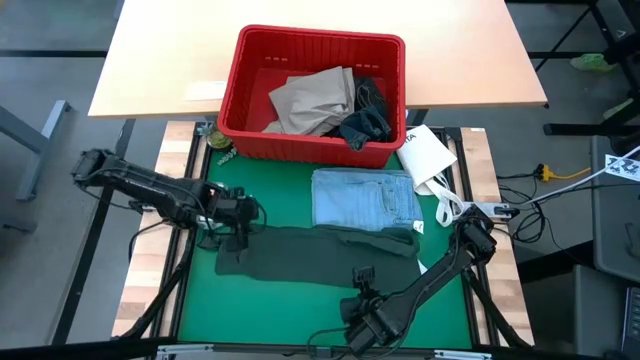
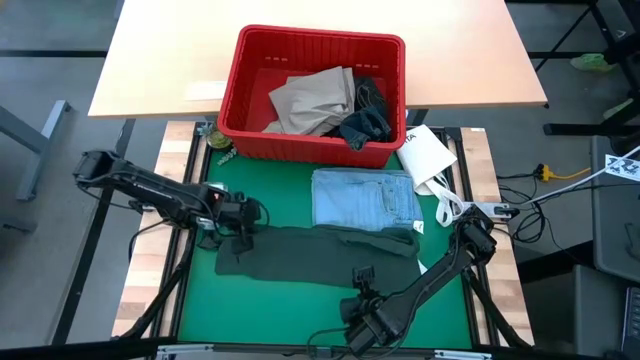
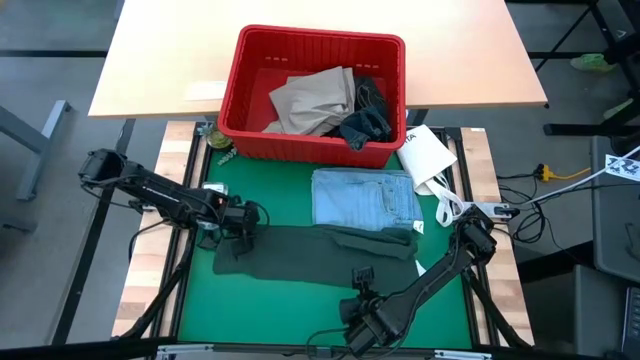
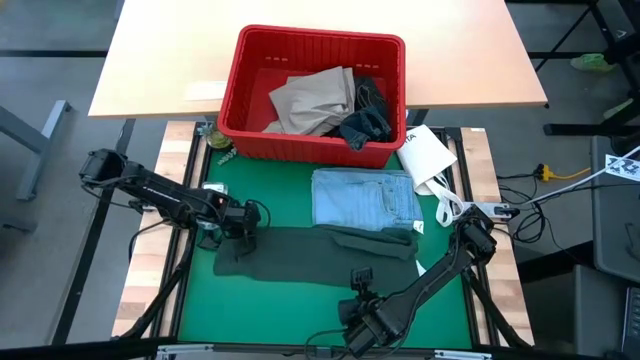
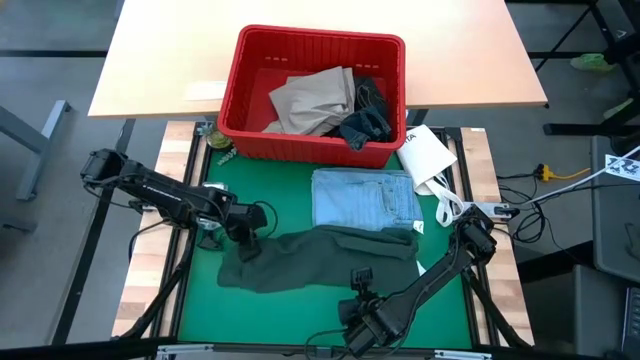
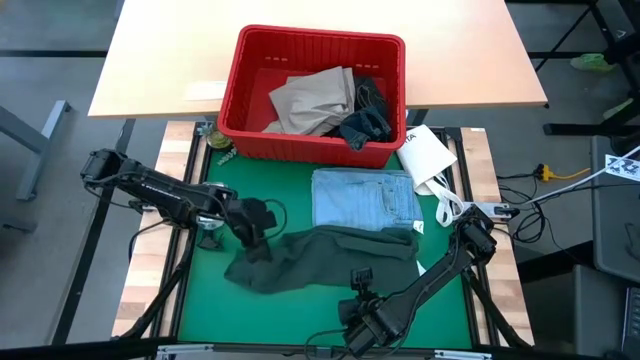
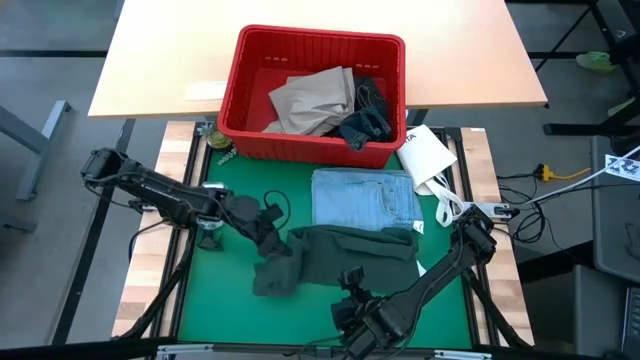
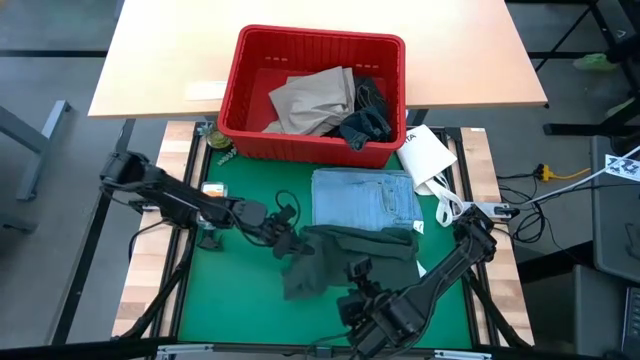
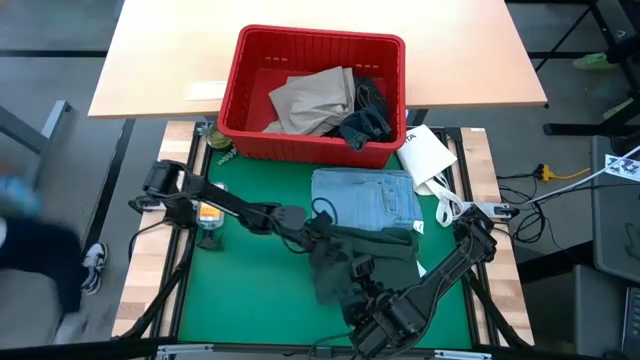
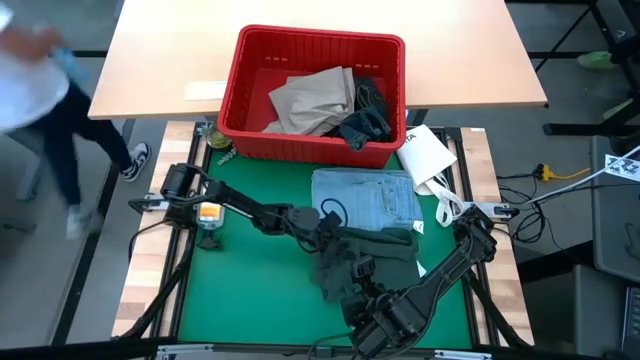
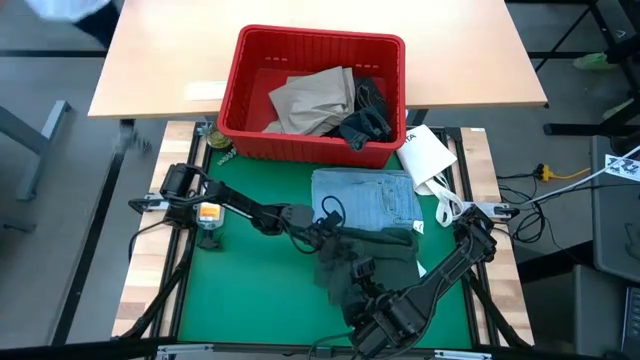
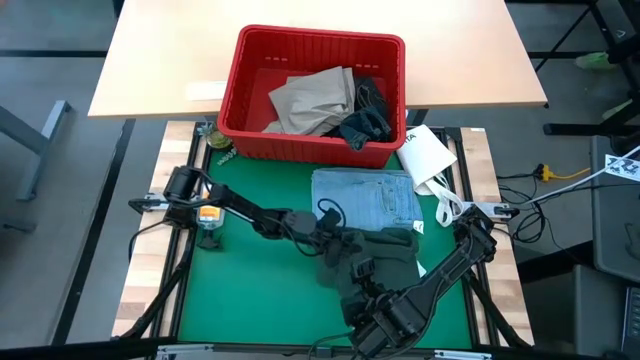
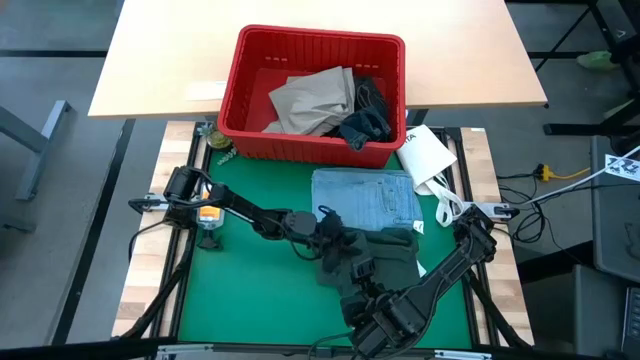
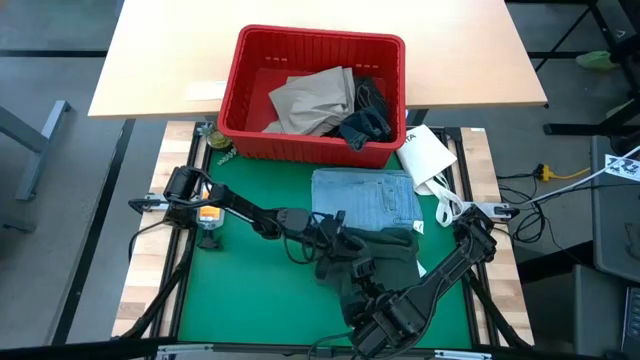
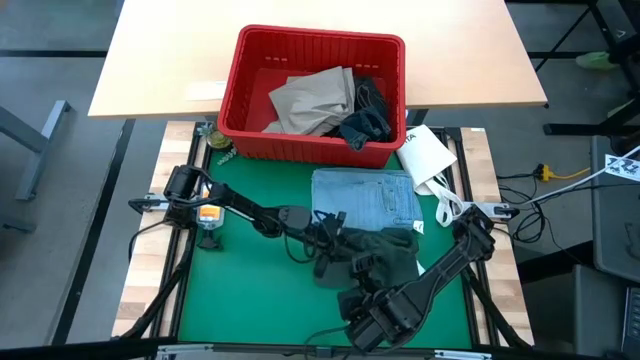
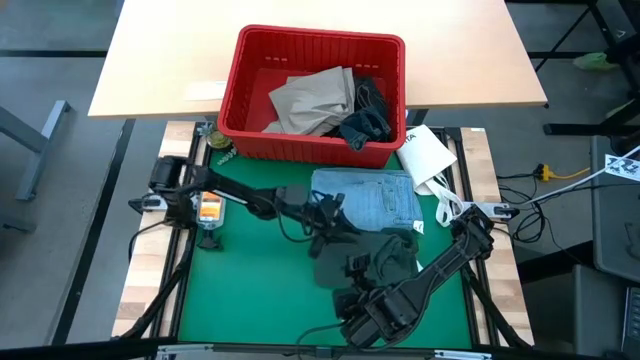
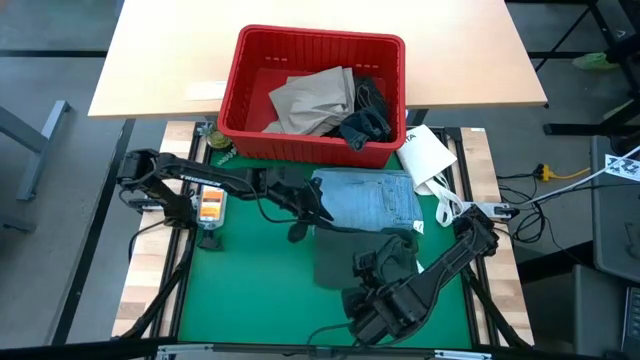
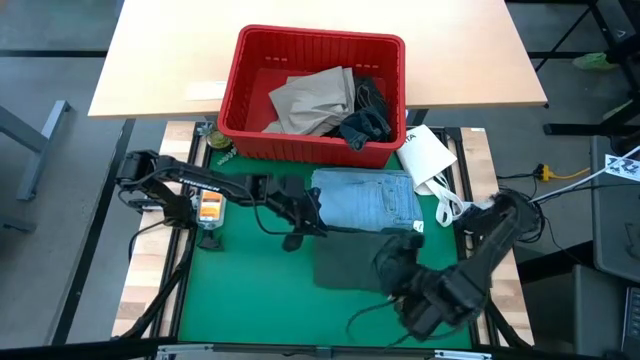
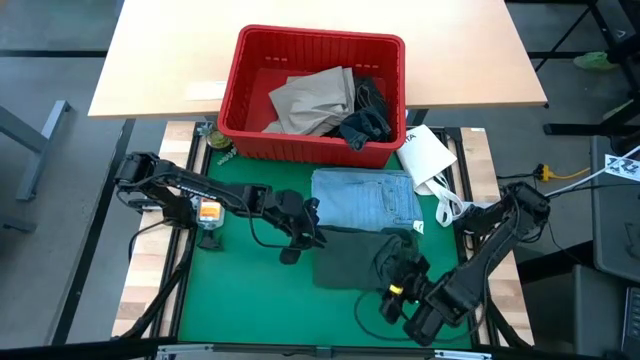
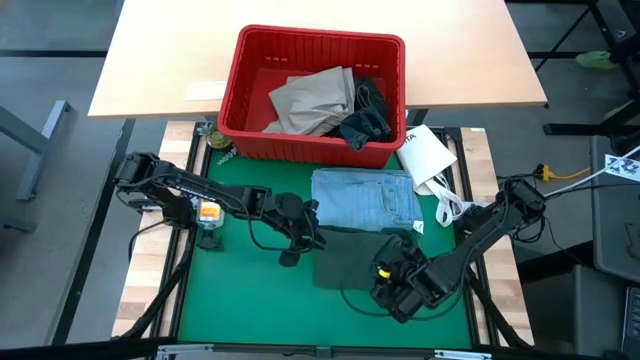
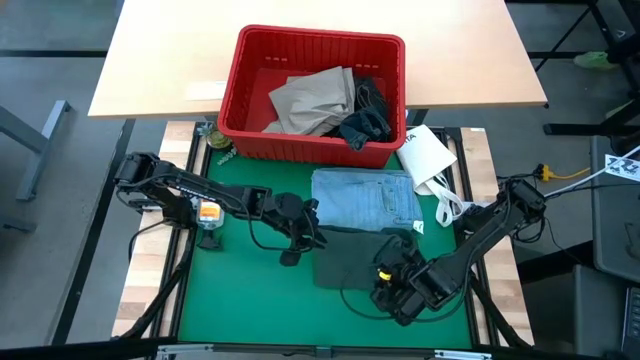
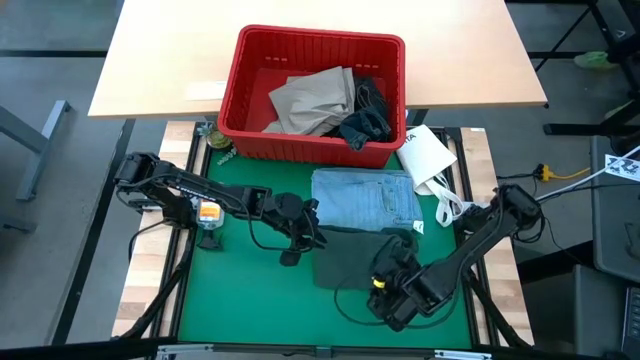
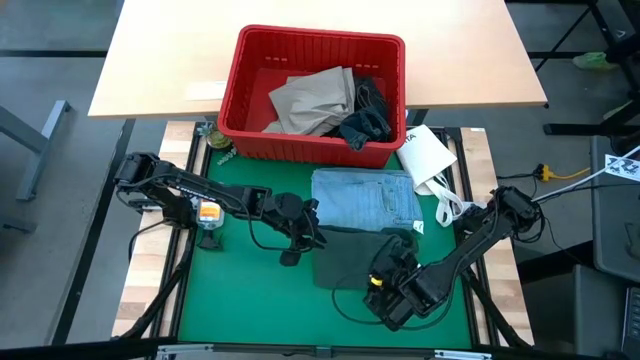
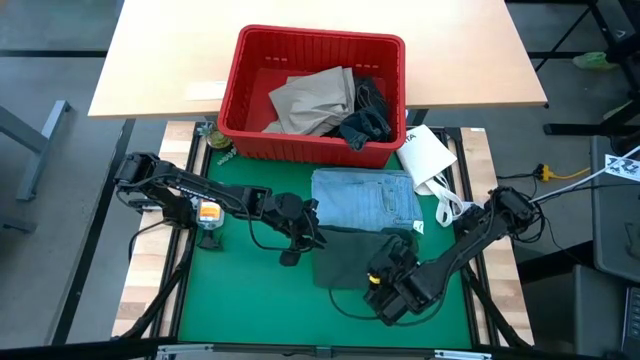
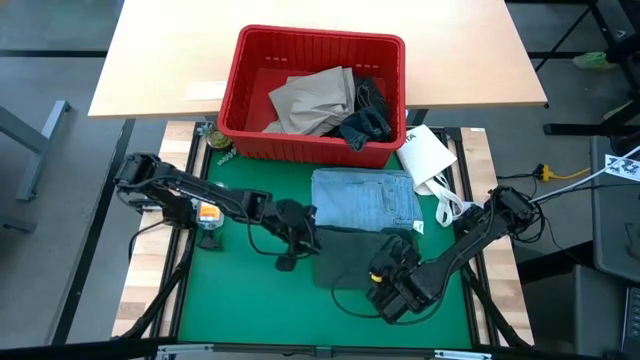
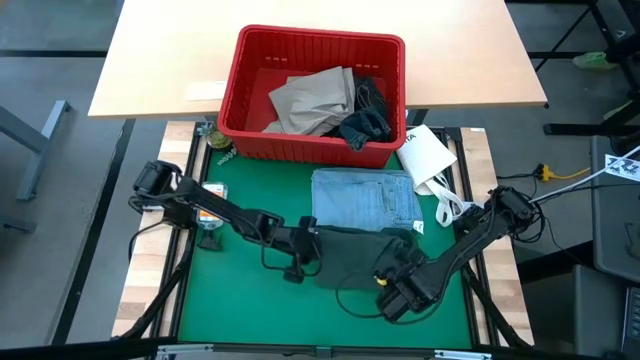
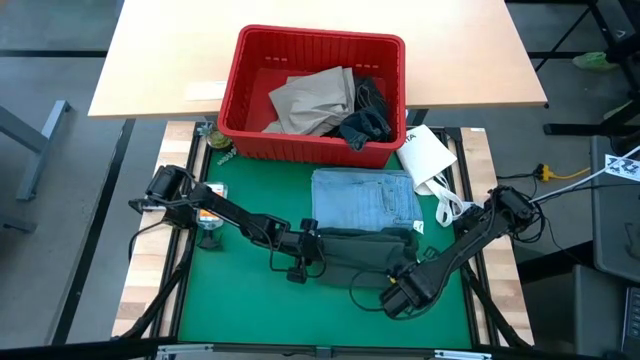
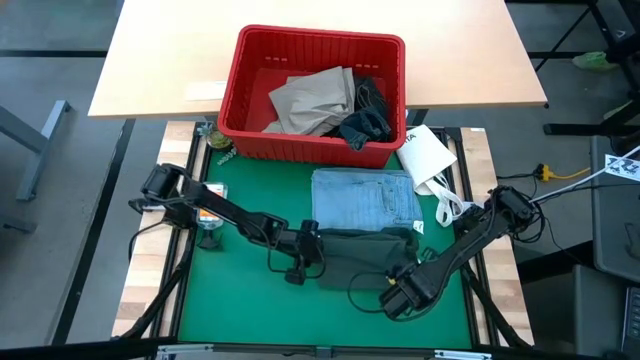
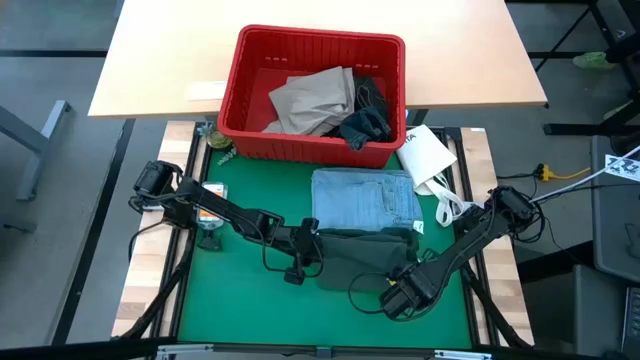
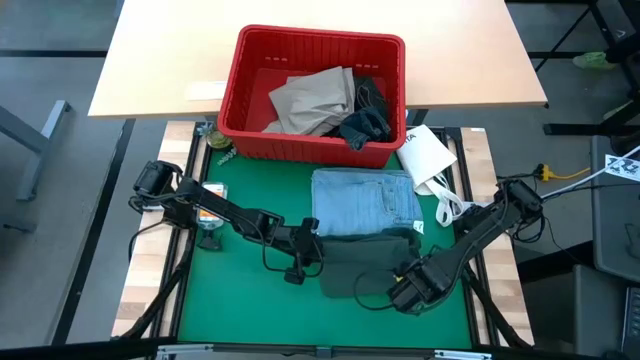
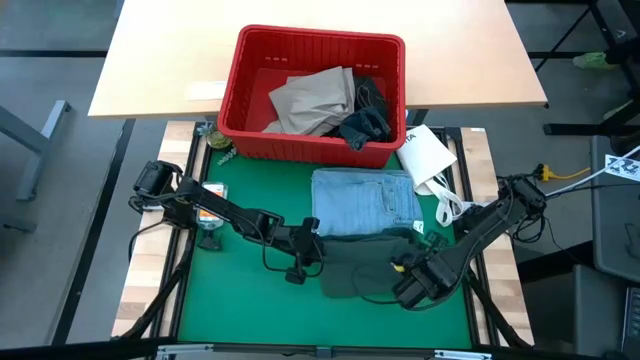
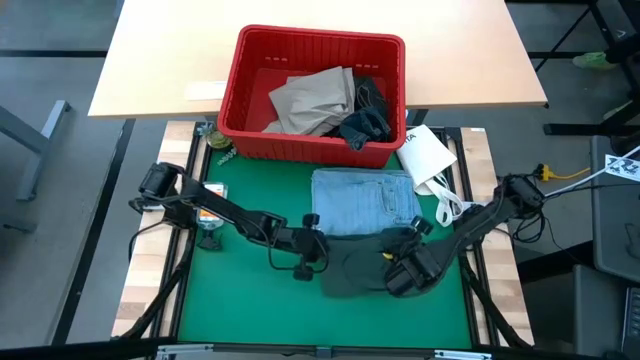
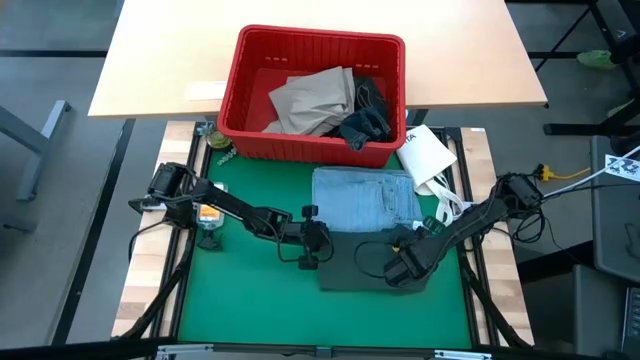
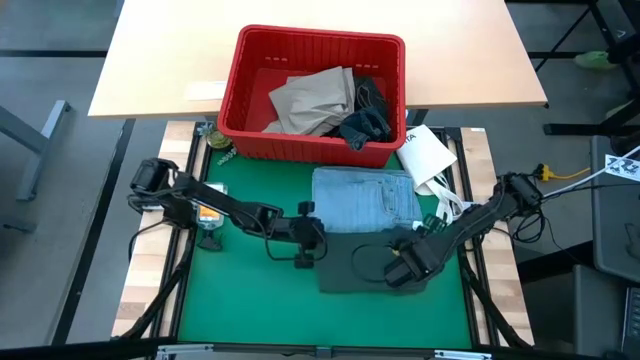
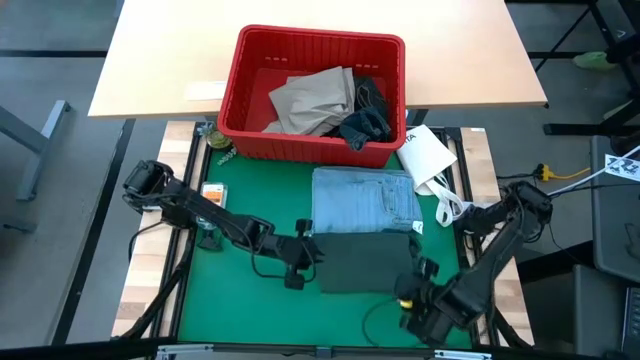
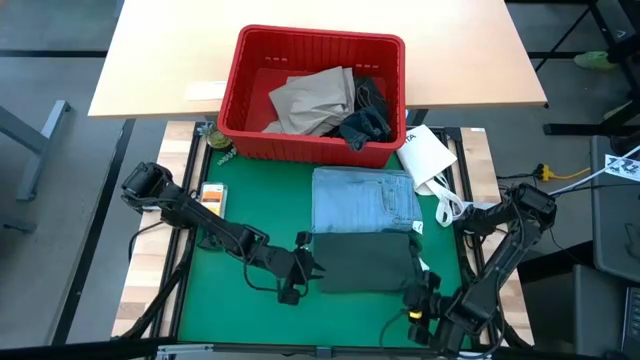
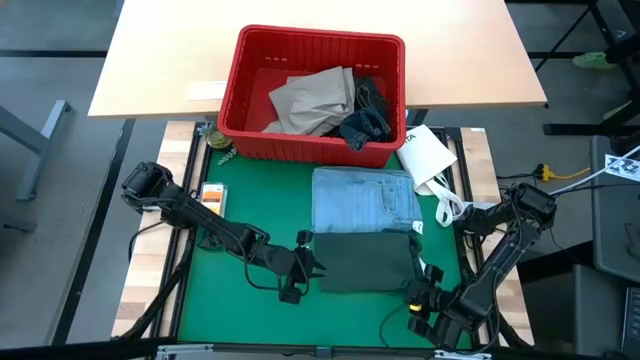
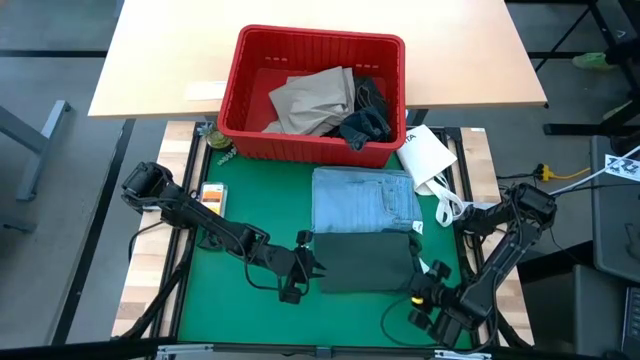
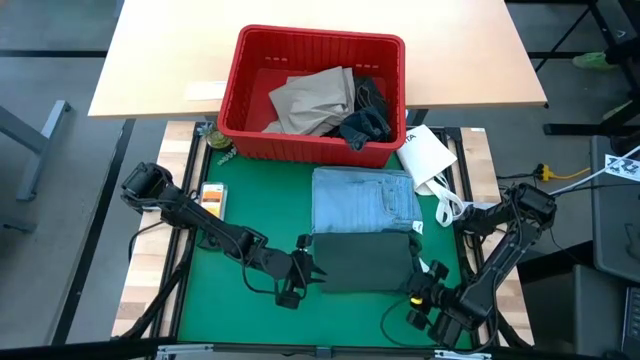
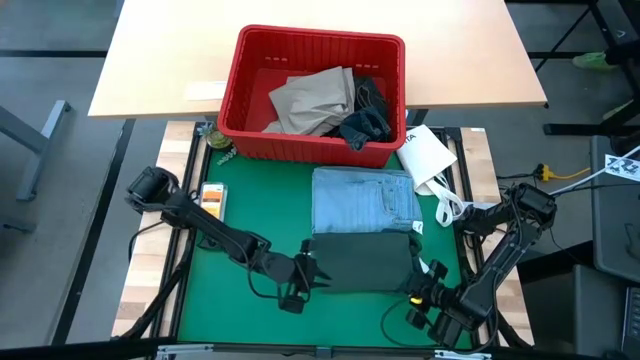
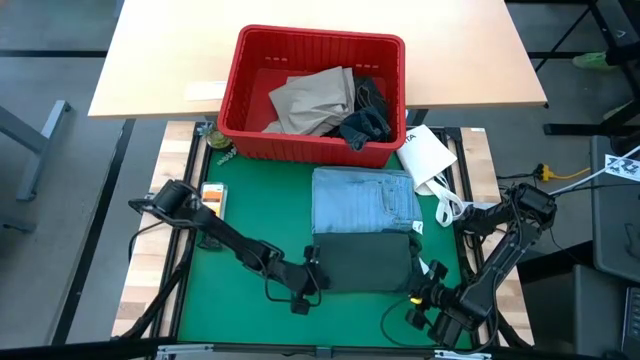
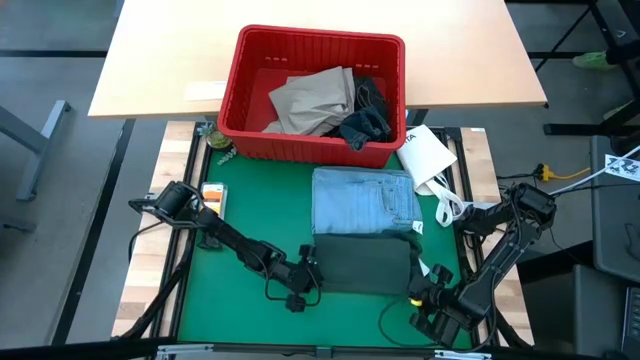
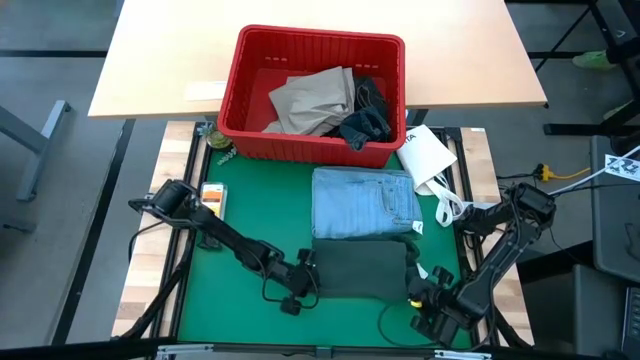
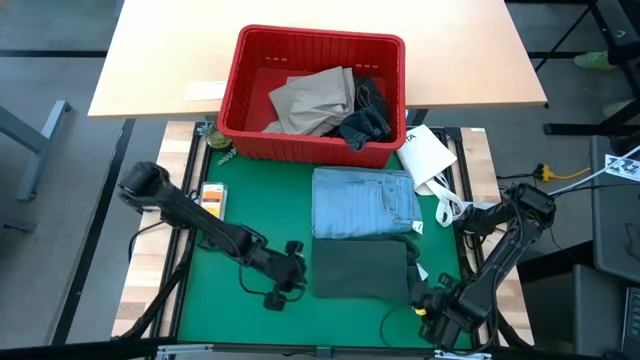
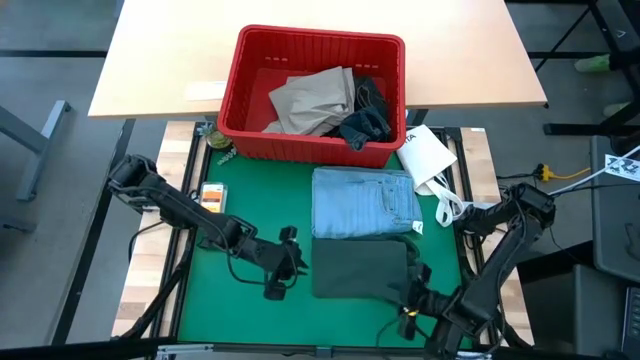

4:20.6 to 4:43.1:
Task: Fold Laundry from Bin
Fold the green polo shirt
